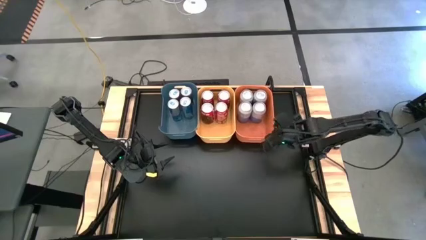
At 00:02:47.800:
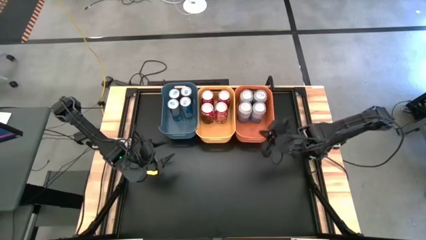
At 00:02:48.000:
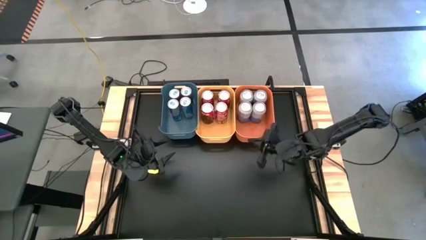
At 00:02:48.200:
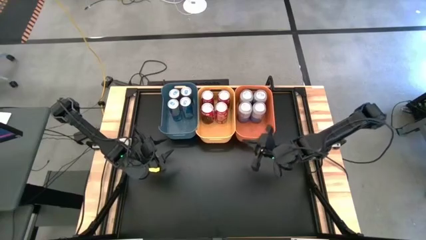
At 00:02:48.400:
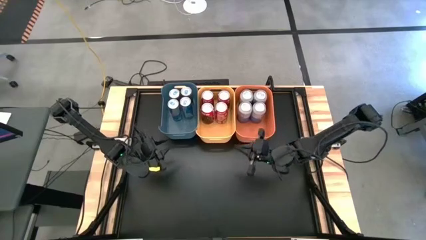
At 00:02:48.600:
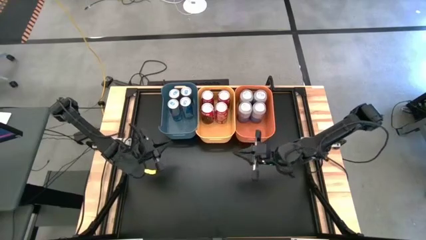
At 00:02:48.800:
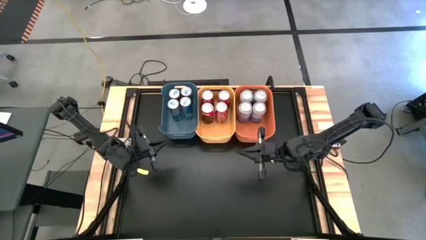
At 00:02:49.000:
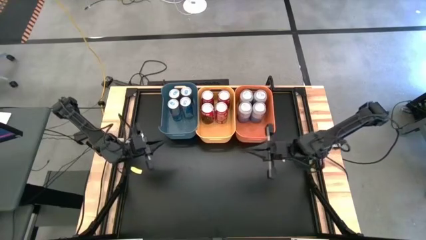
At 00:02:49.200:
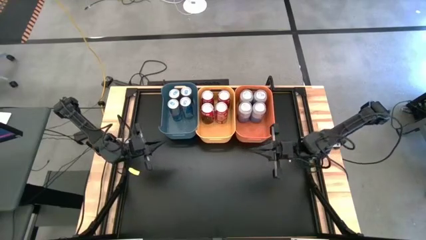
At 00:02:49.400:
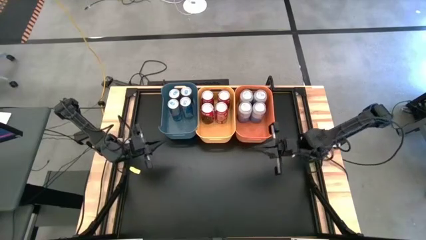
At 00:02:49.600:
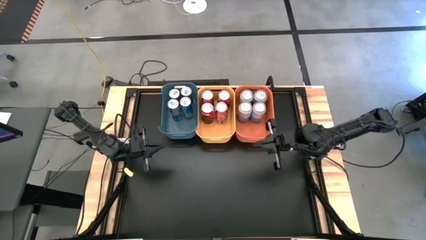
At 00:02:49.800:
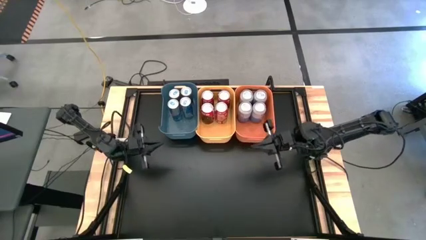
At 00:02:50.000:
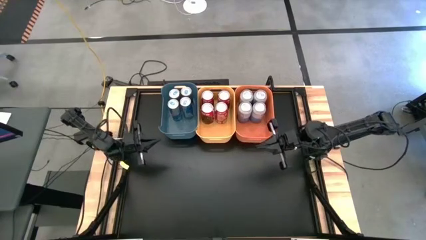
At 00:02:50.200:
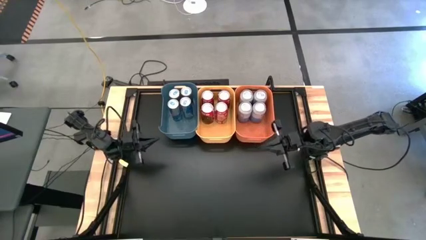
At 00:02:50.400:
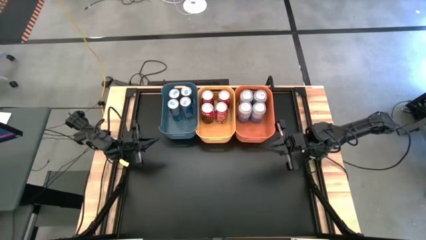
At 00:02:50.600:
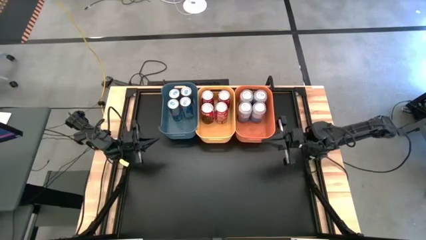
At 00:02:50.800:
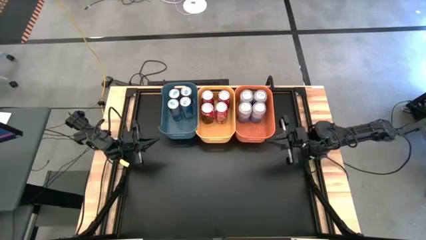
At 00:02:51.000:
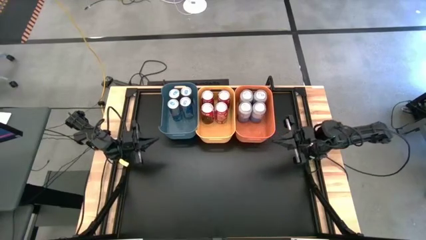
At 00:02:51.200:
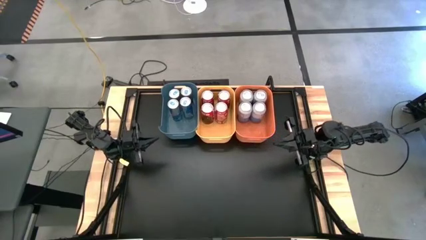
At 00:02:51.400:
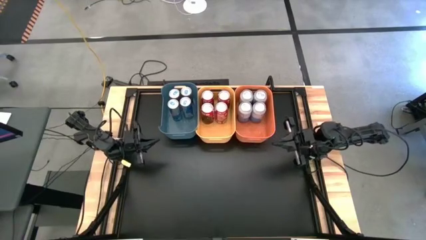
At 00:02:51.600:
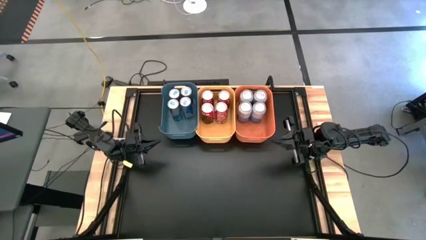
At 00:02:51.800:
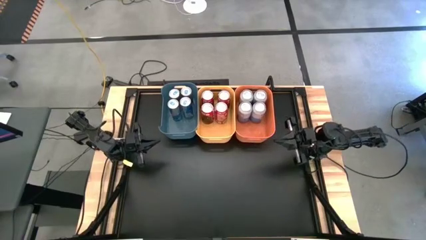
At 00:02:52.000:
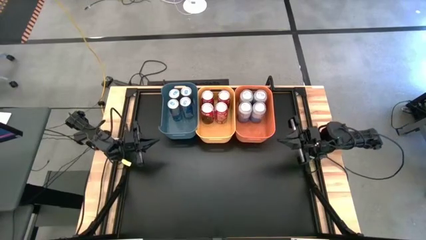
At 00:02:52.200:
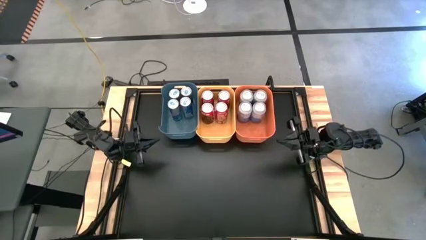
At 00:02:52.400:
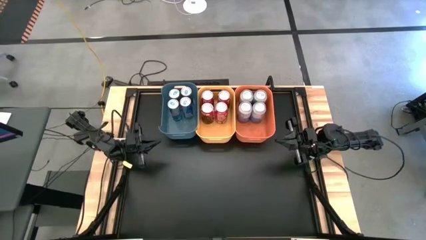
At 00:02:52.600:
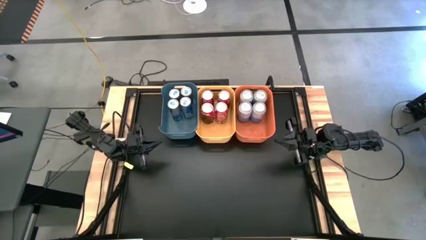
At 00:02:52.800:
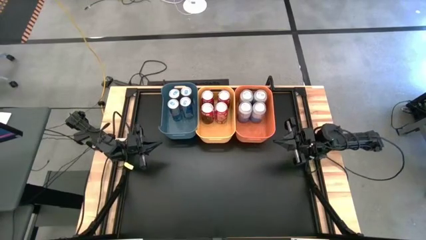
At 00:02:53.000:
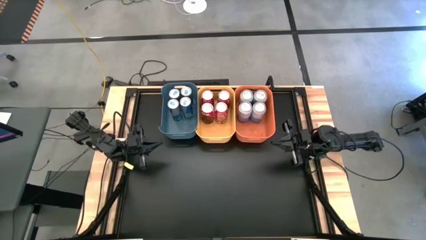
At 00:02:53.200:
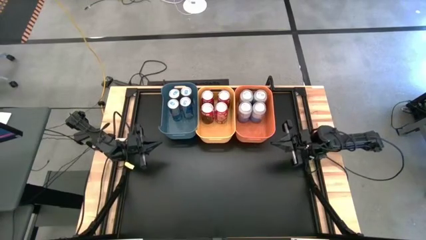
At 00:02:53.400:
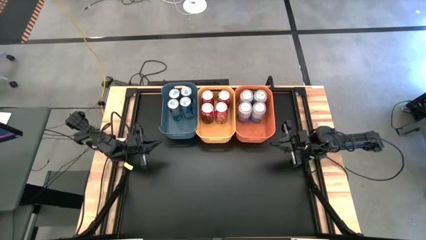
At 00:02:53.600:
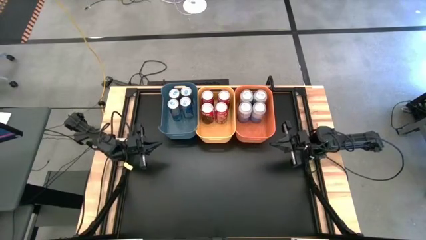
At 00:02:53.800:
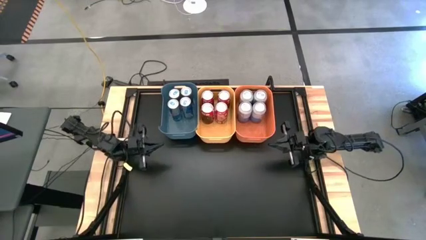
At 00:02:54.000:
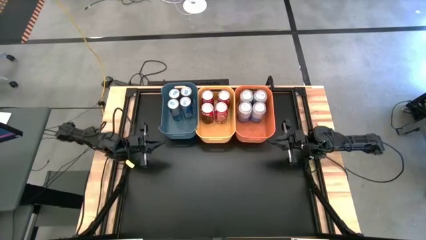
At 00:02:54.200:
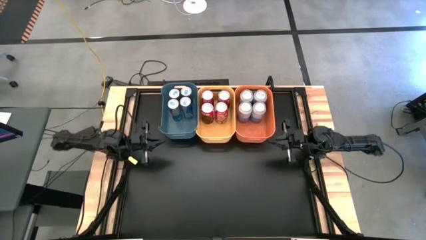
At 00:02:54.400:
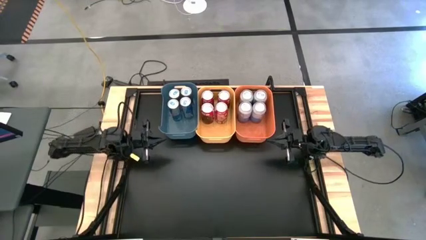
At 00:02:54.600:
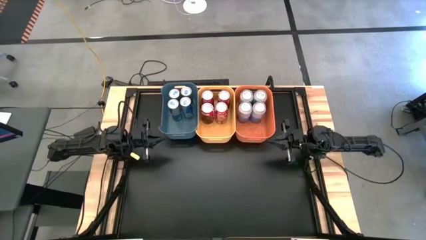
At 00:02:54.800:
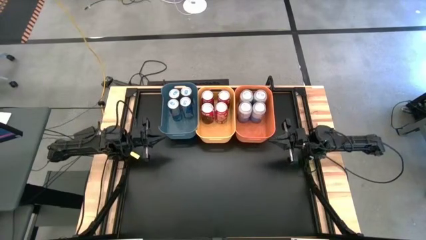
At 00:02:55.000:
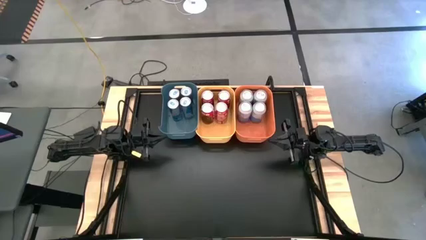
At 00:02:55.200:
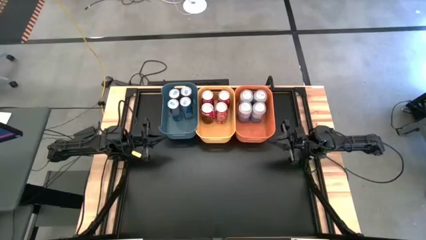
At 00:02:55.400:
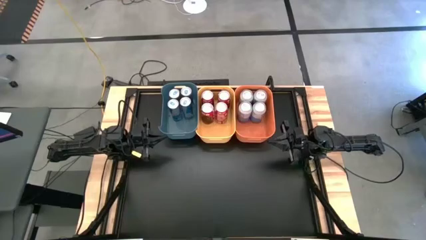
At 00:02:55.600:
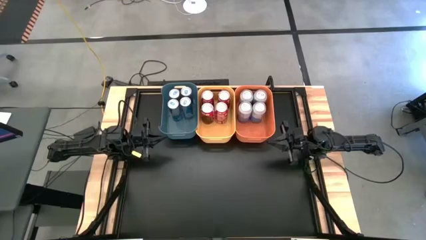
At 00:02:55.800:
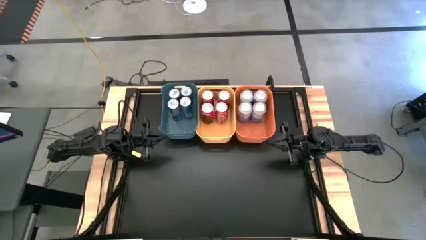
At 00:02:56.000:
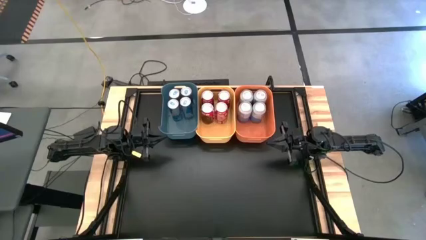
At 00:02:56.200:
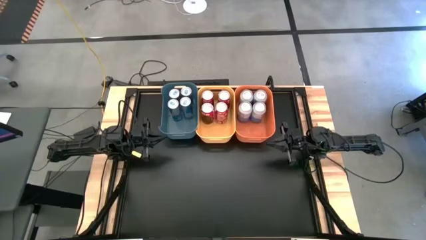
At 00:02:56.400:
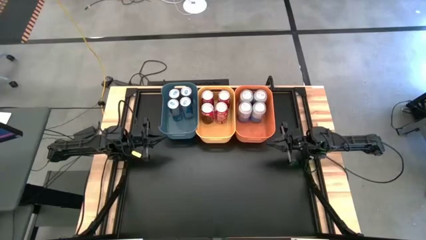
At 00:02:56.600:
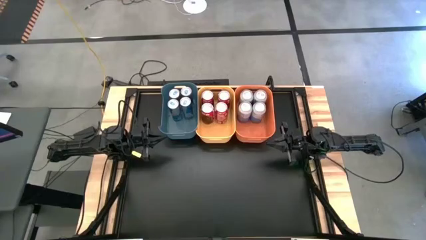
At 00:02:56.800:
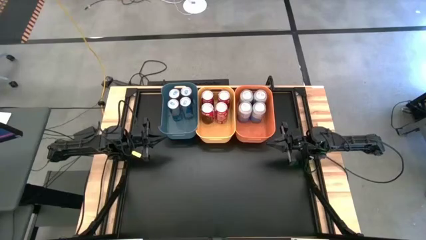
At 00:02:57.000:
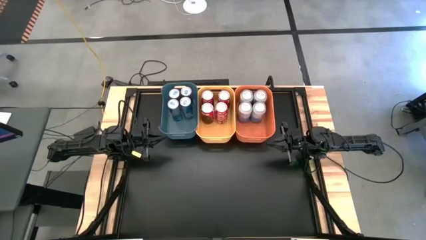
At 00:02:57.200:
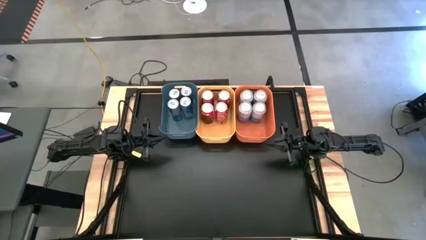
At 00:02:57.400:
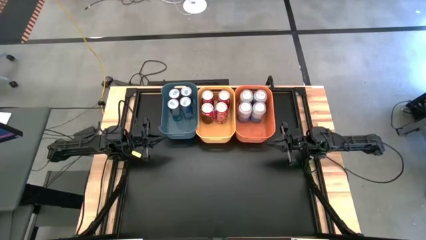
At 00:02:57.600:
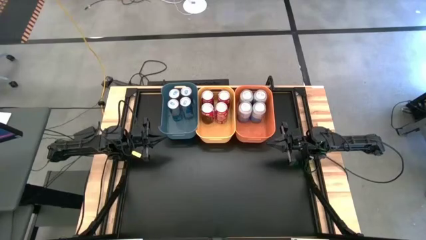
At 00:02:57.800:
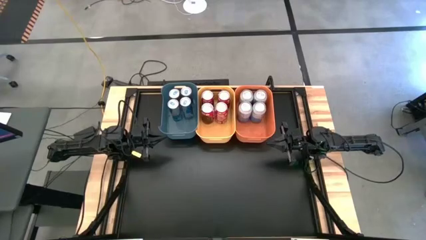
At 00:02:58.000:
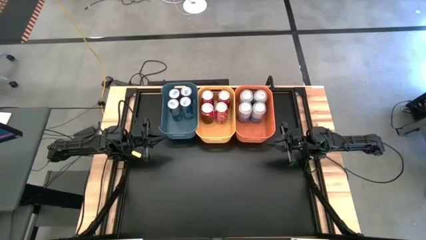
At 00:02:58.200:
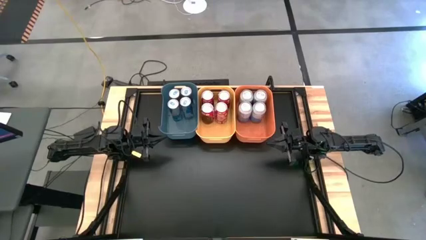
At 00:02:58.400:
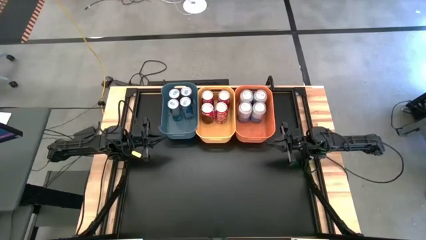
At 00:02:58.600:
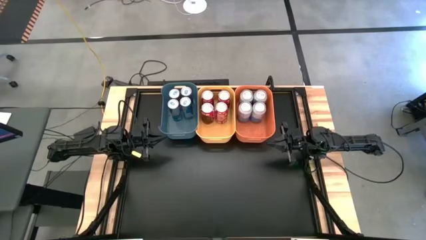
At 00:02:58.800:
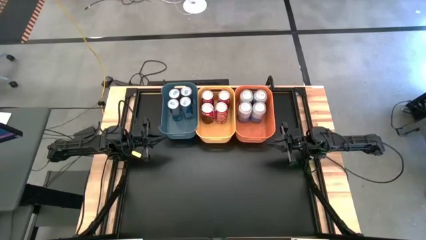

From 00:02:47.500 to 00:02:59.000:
Task: Sort soda cans
Return to Home Position

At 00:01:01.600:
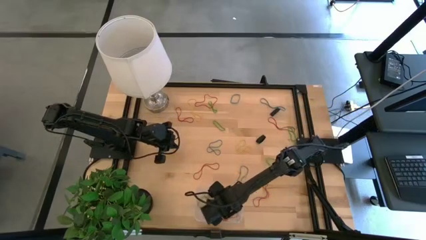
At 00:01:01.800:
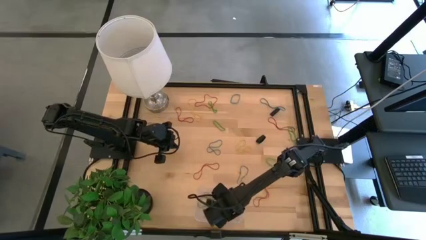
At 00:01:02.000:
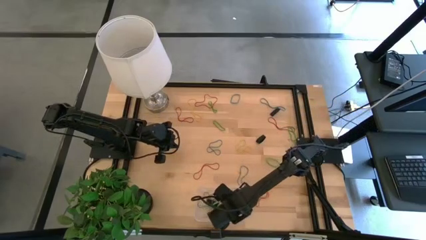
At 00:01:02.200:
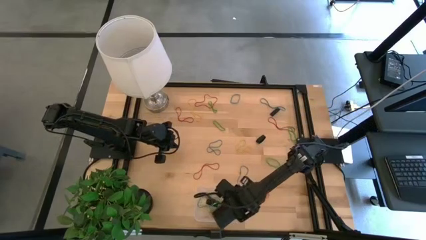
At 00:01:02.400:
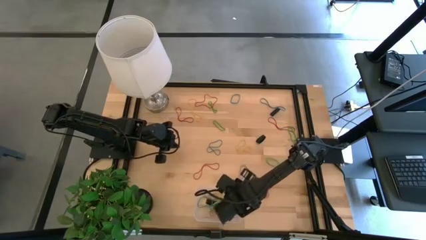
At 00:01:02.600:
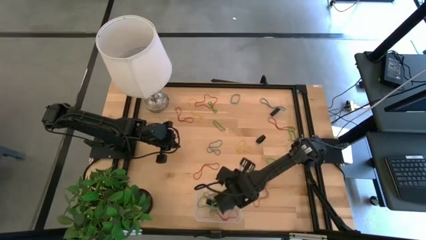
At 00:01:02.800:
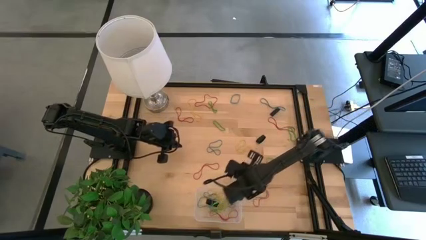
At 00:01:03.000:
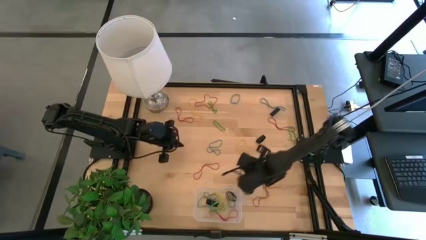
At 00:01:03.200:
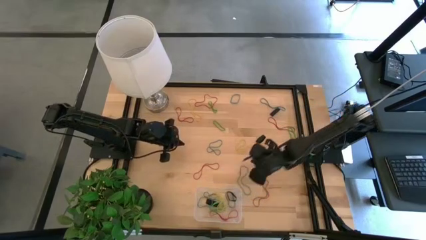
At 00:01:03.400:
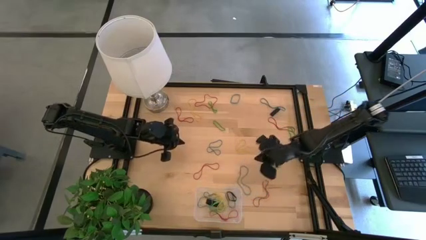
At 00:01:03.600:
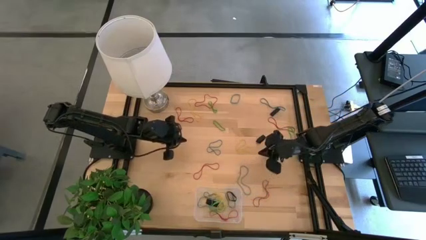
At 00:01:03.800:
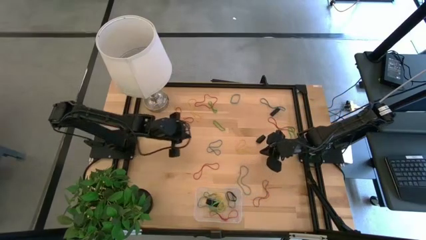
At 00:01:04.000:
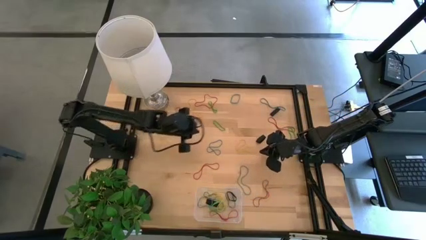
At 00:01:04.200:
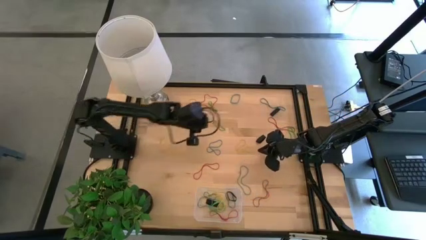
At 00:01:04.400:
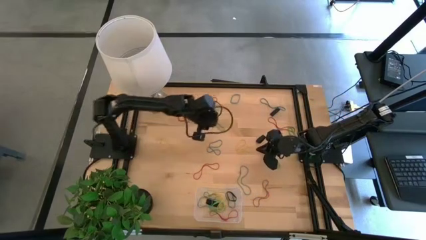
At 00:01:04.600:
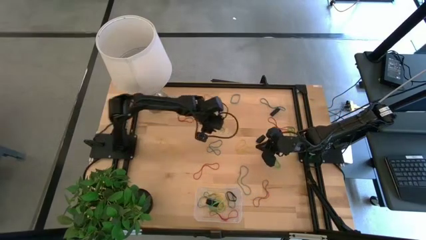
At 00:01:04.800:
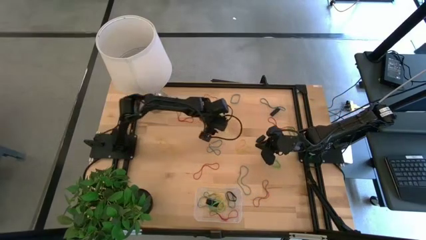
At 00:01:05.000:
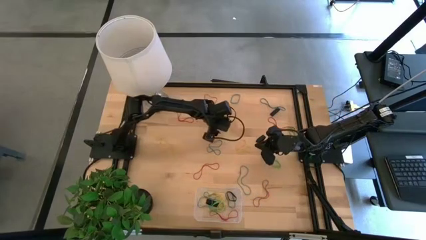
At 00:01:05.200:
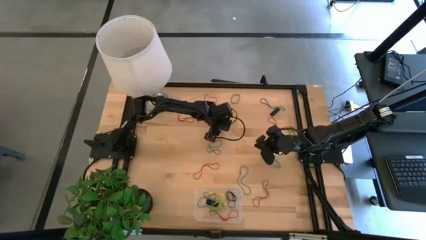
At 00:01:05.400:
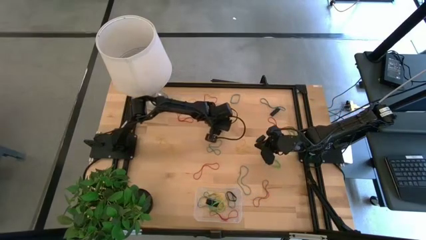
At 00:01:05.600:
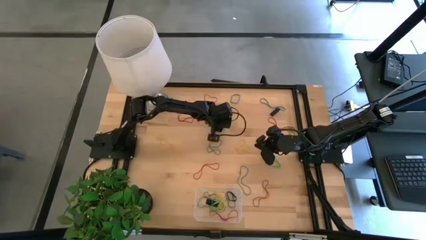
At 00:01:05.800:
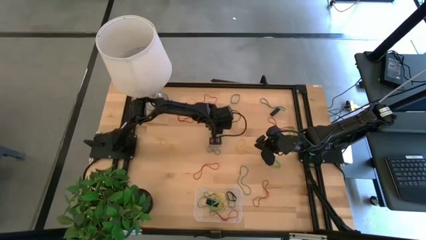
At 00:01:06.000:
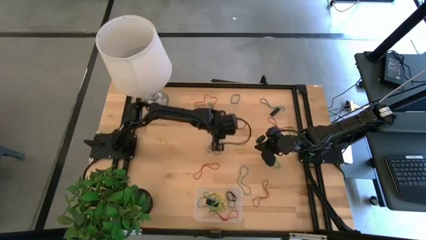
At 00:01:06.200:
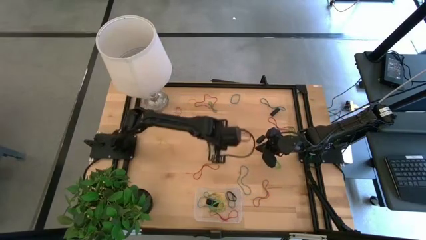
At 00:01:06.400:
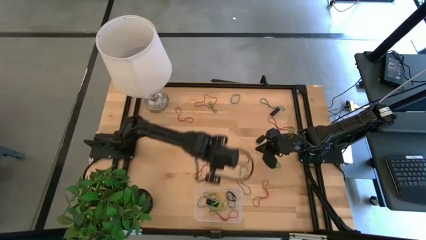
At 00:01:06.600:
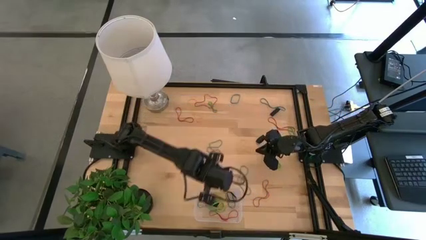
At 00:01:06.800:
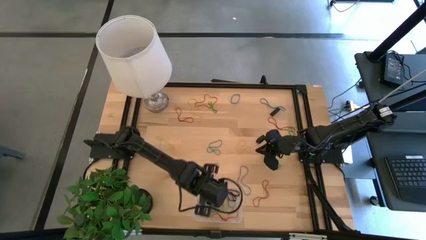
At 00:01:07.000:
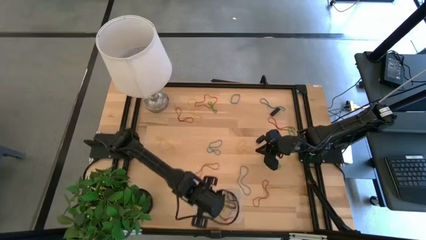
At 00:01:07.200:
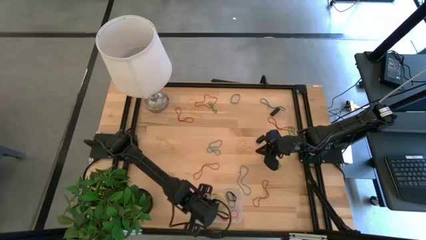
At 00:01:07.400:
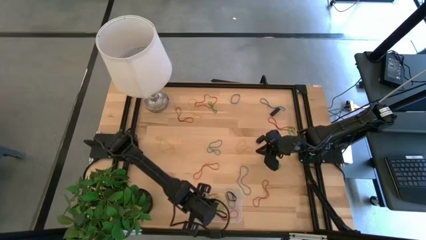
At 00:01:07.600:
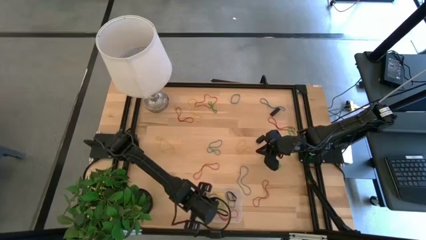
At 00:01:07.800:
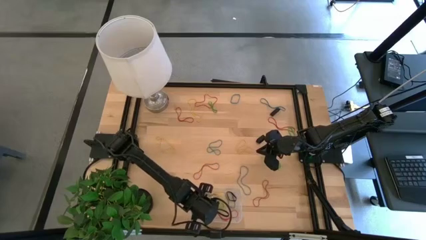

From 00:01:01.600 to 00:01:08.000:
Task: Pick and place rubber bands into bin
Put the green rubber band into the transparent bin
